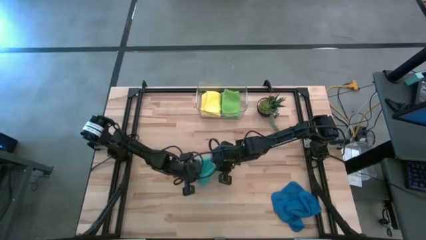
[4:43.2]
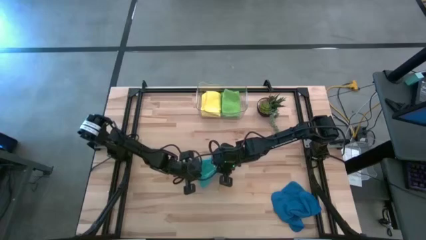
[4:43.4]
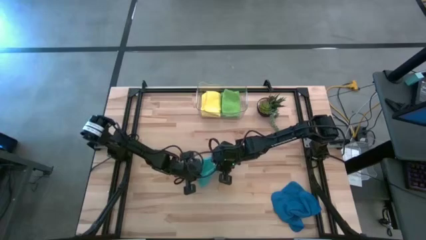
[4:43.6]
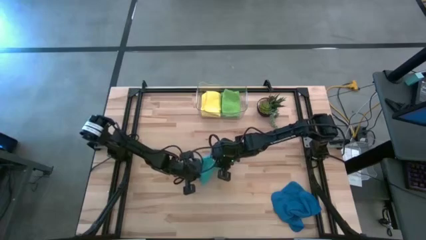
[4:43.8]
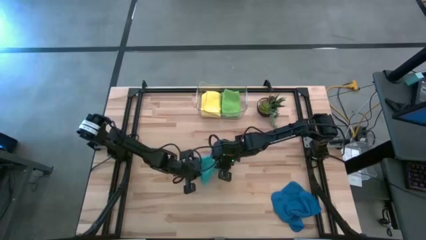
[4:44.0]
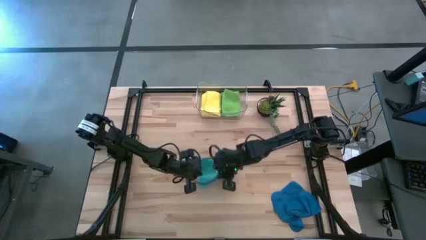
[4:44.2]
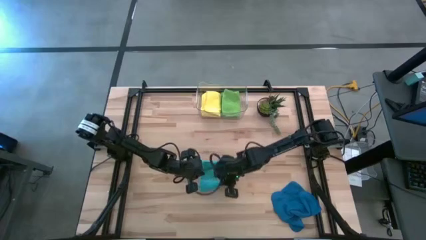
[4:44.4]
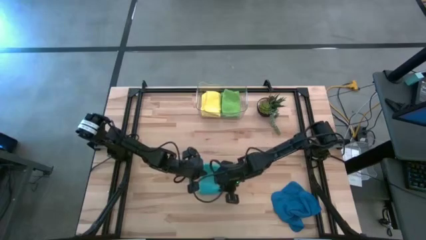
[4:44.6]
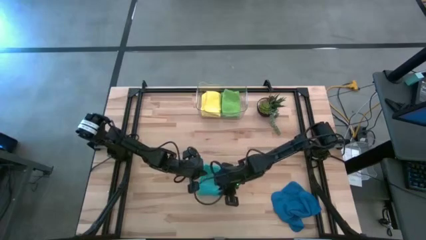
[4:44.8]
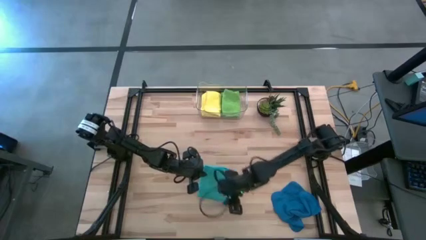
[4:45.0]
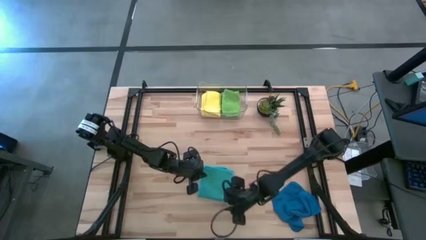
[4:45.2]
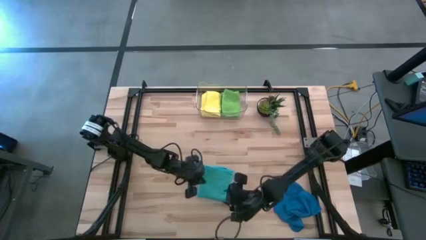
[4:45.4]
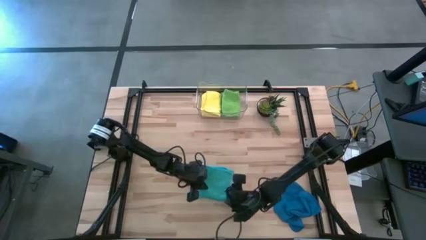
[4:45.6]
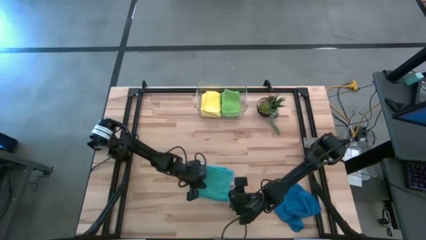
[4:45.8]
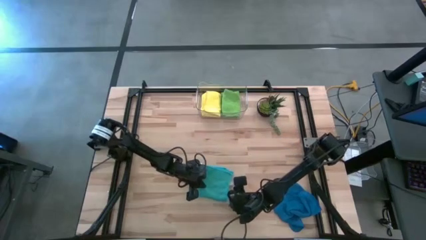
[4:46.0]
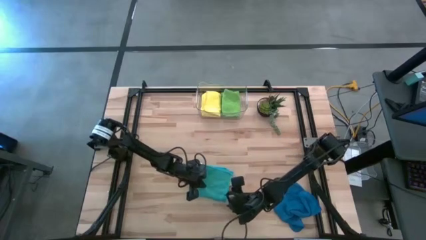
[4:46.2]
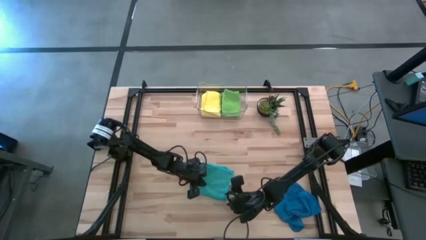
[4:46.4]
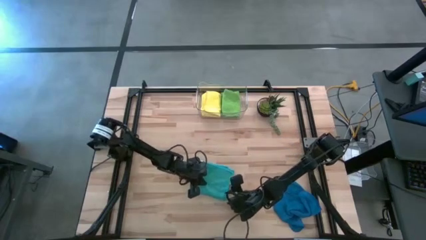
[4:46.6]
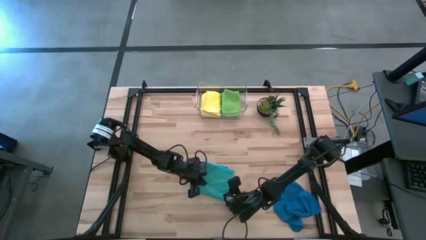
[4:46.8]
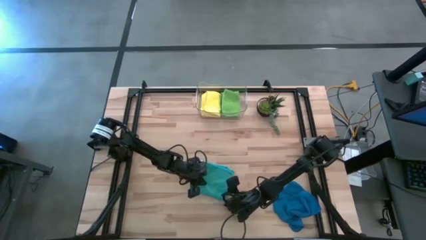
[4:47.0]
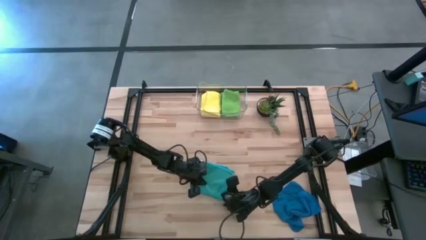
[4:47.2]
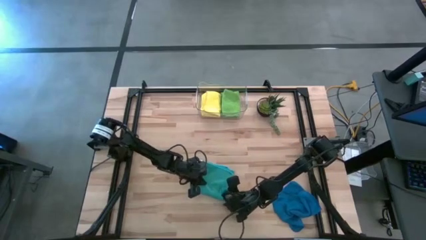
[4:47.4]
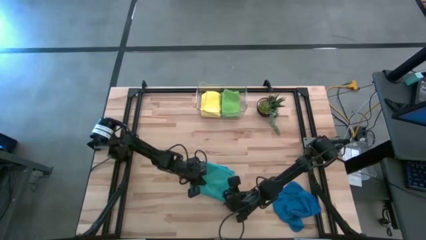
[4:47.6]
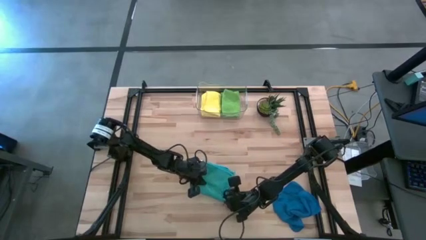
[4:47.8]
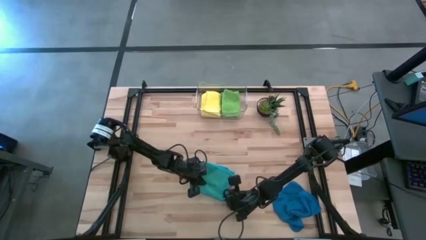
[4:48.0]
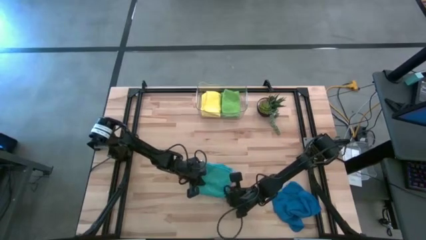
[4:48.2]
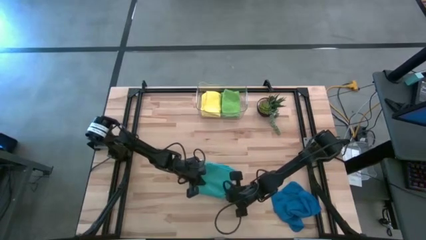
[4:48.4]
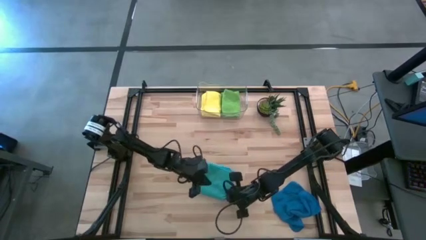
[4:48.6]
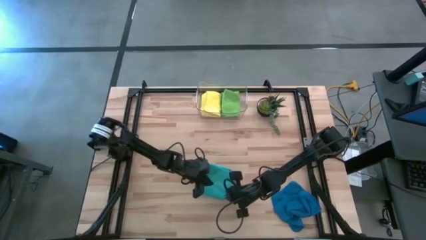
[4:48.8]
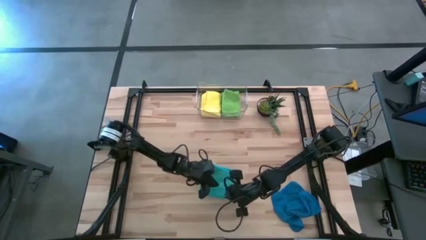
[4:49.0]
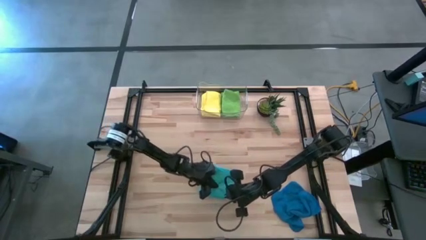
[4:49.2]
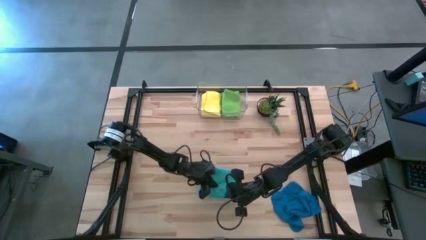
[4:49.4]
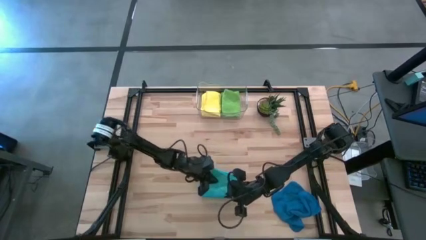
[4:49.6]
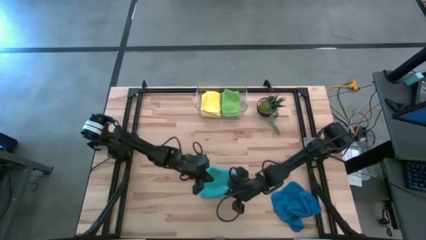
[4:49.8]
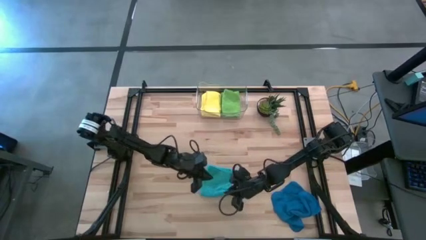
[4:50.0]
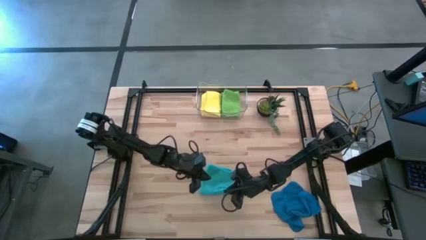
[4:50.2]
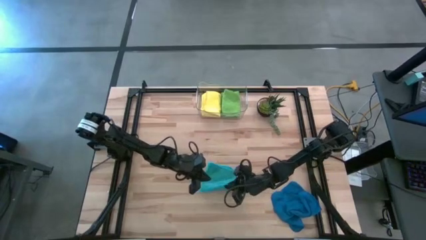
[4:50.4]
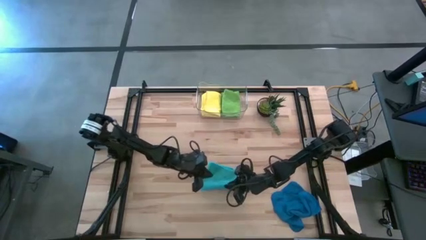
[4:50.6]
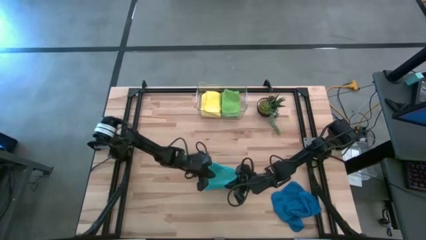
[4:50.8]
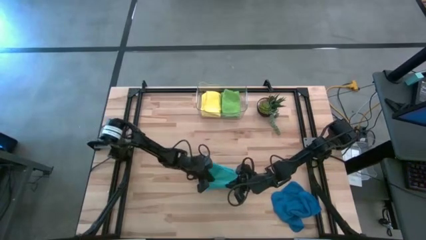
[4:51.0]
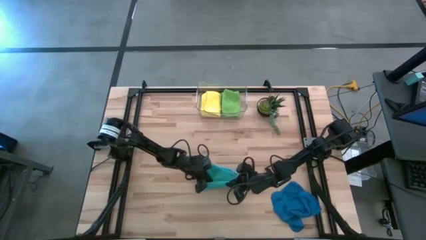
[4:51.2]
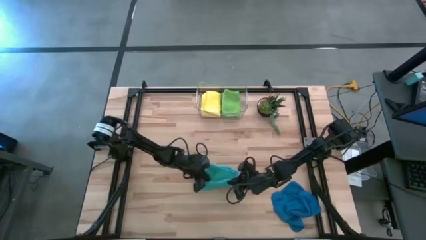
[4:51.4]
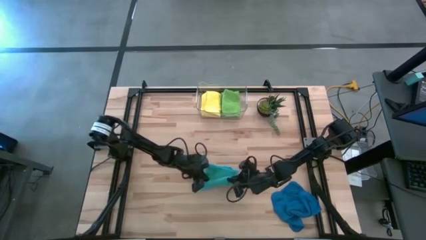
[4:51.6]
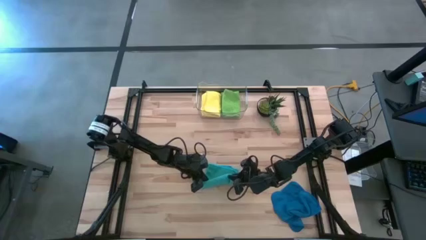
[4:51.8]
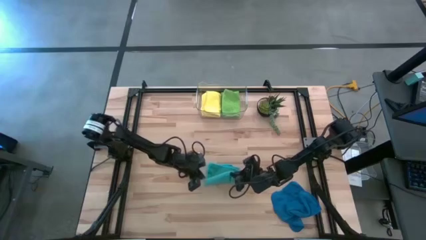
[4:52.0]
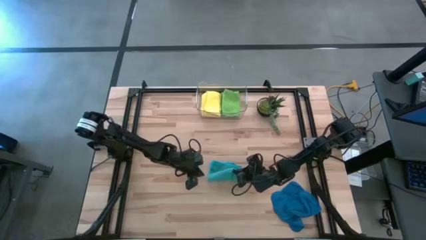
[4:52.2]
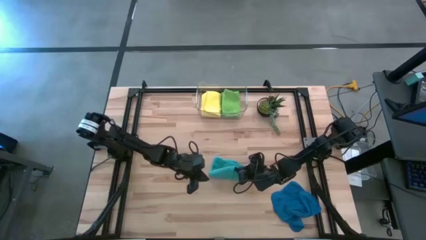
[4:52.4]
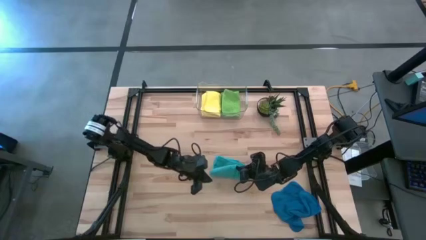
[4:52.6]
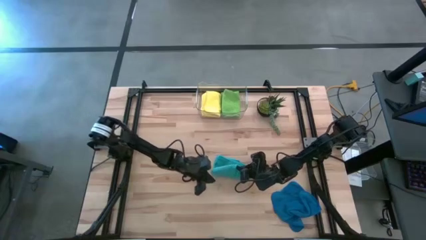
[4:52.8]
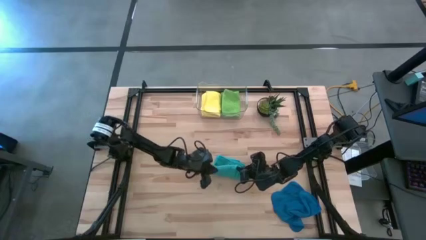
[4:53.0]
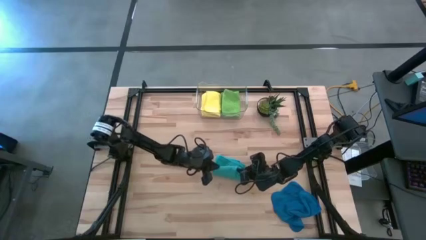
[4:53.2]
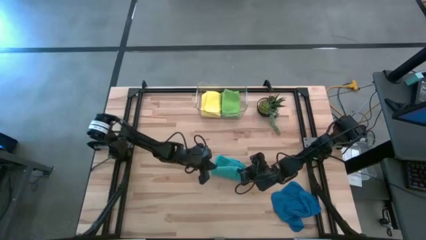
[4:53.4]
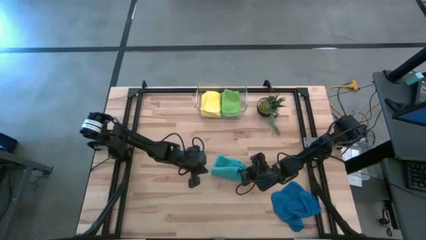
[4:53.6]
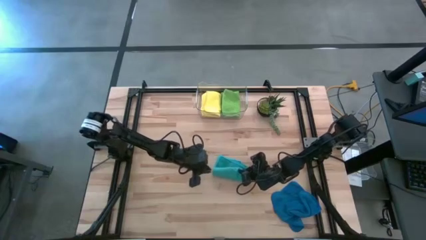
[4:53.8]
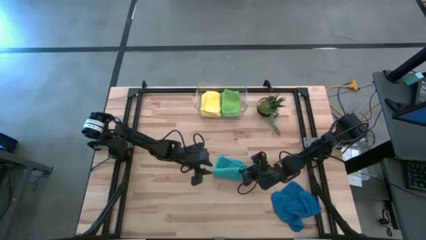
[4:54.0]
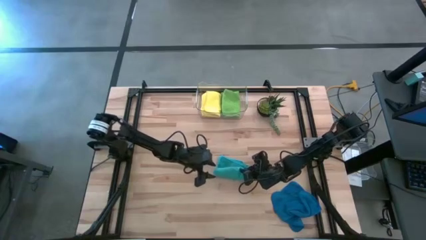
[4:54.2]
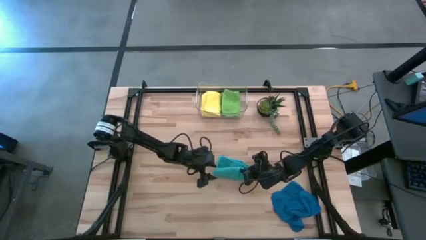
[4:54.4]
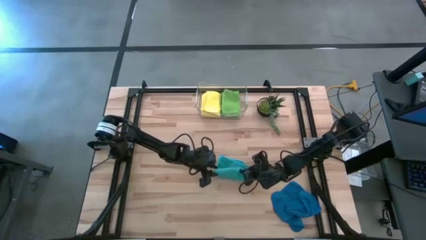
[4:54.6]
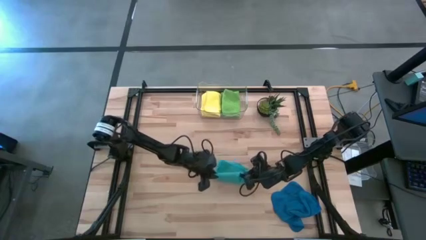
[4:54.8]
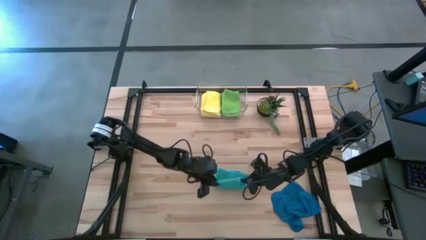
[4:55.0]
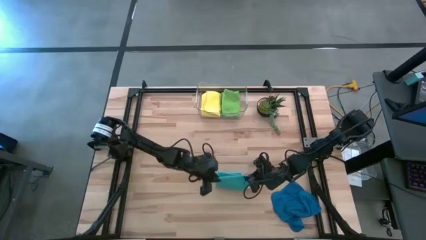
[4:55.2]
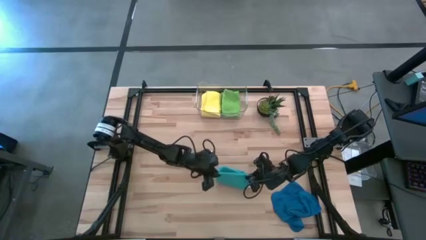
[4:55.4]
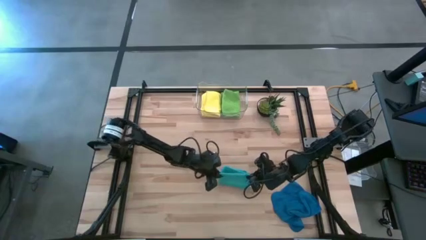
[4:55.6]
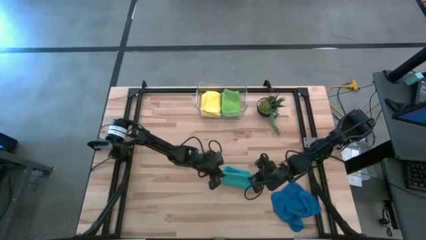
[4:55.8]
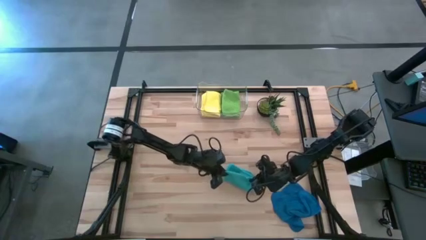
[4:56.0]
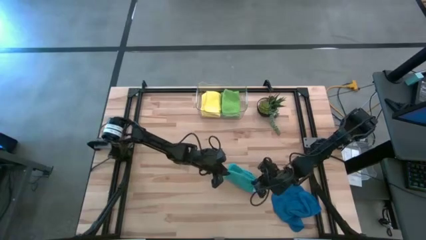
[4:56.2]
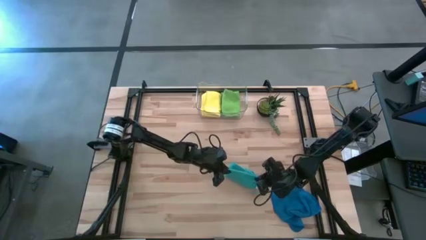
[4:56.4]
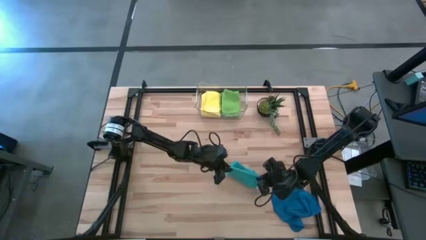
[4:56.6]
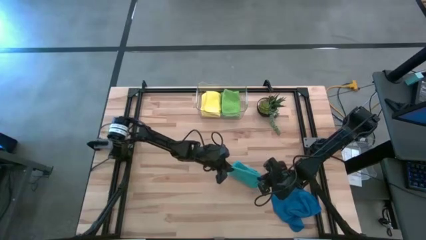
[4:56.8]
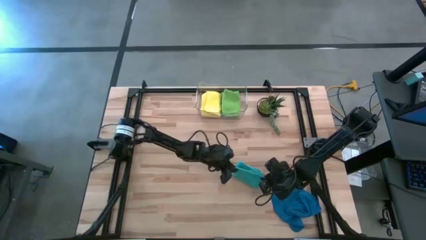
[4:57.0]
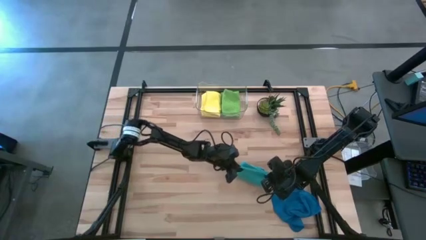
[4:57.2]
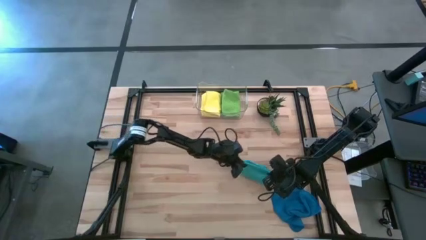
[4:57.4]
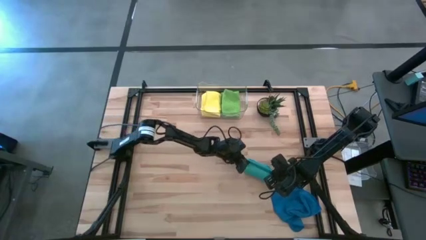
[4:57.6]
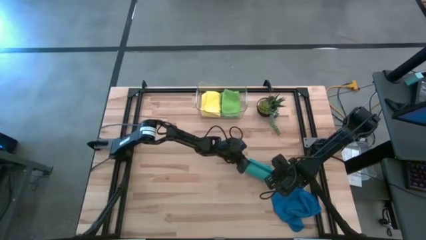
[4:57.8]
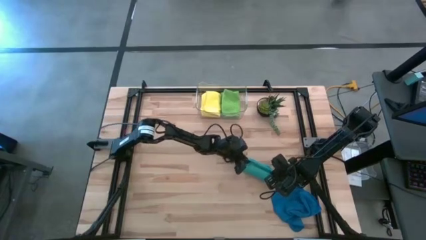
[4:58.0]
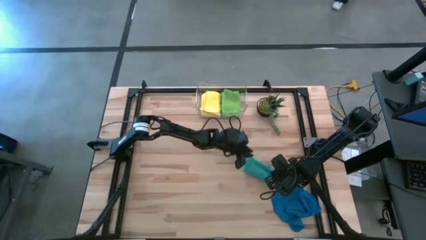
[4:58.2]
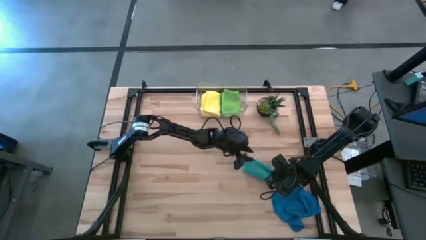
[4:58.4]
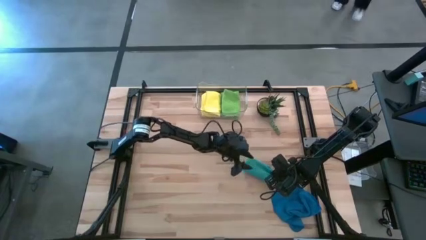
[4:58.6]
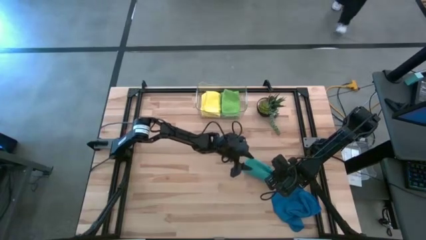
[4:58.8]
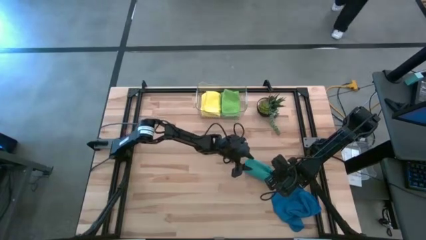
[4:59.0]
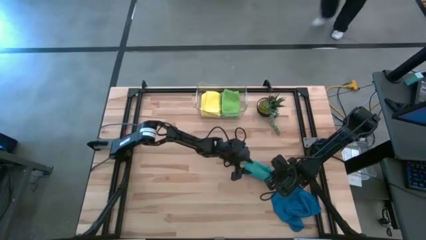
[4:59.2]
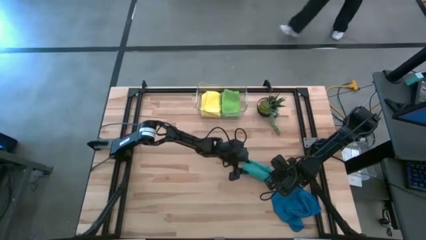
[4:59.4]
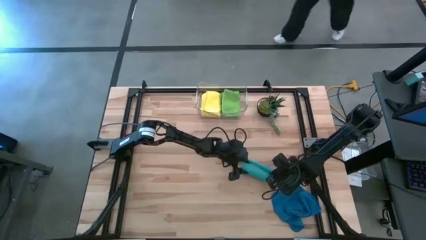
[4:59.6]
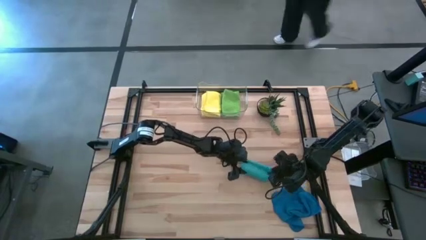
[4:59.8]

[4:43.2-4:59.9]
Task: Fold microfiber towels
Fold the light blue microfiber towel
